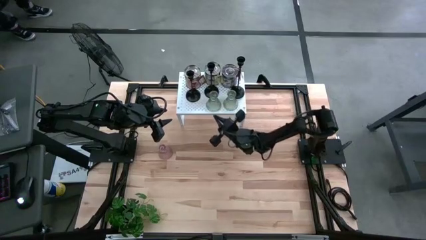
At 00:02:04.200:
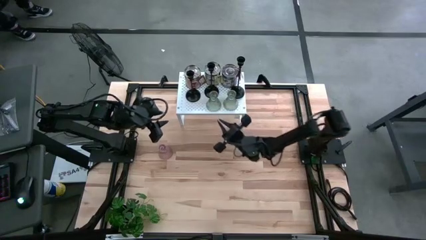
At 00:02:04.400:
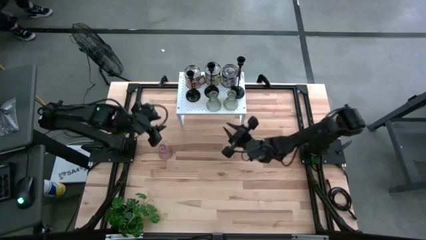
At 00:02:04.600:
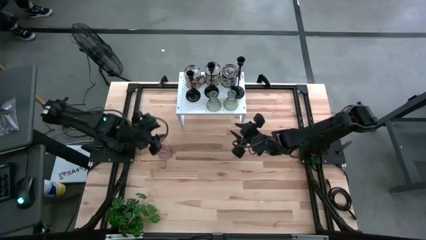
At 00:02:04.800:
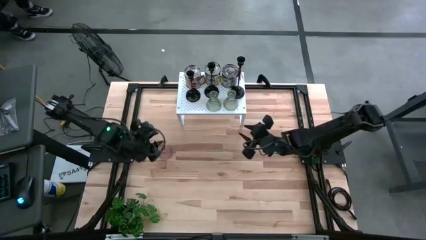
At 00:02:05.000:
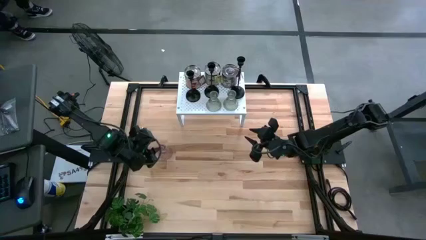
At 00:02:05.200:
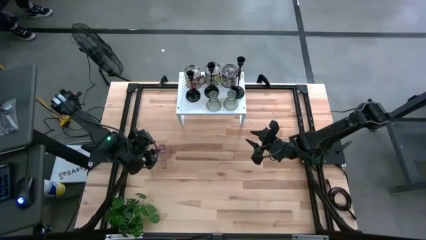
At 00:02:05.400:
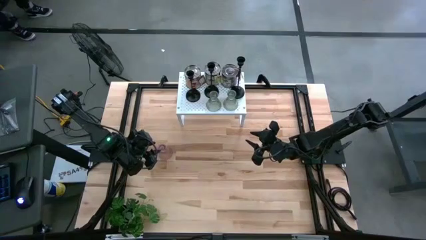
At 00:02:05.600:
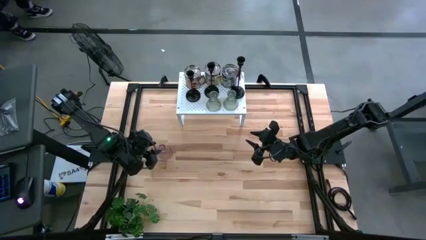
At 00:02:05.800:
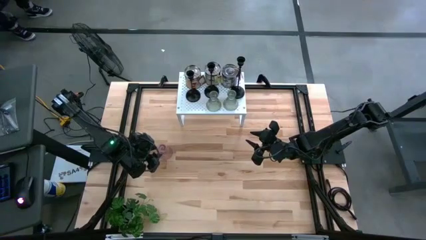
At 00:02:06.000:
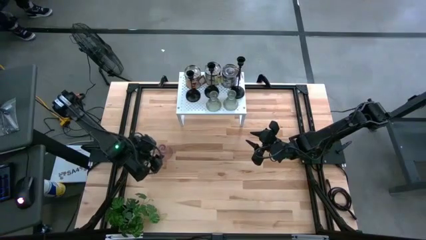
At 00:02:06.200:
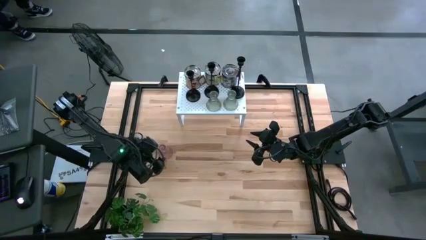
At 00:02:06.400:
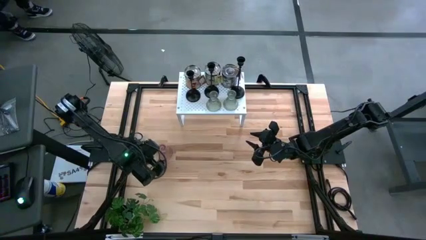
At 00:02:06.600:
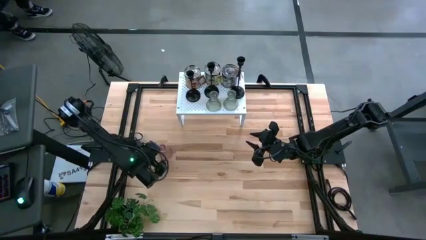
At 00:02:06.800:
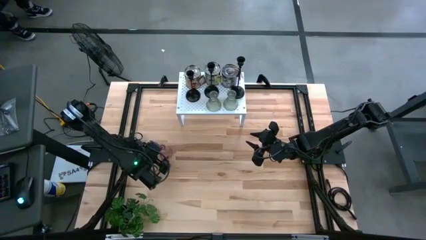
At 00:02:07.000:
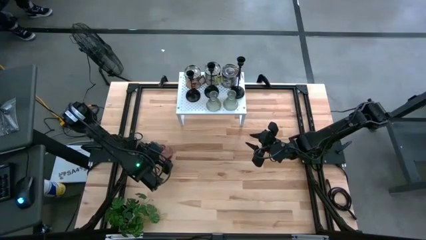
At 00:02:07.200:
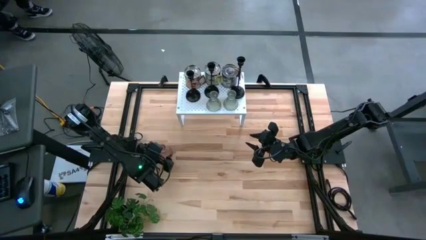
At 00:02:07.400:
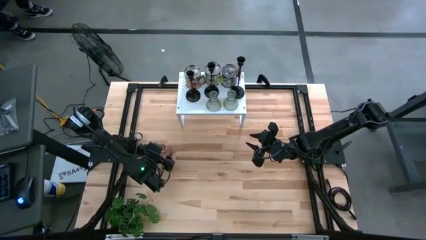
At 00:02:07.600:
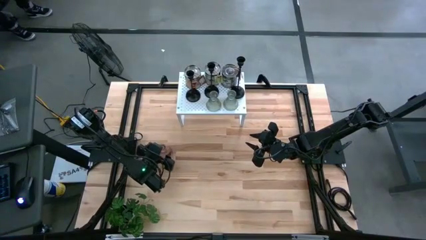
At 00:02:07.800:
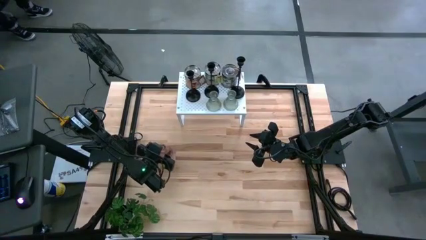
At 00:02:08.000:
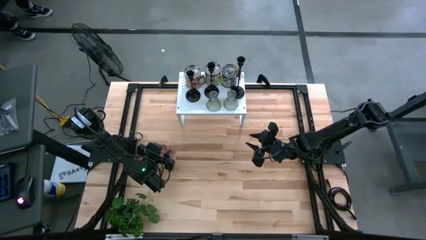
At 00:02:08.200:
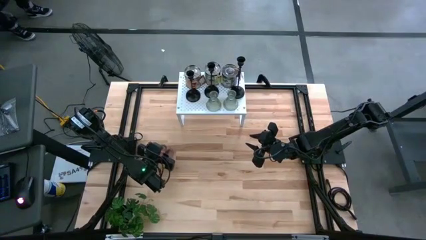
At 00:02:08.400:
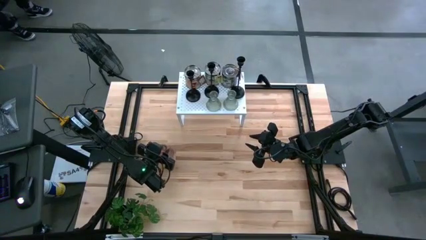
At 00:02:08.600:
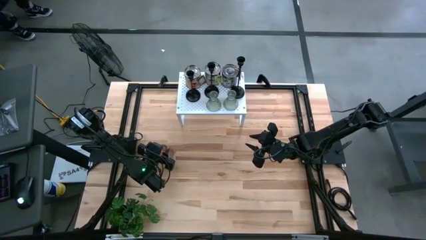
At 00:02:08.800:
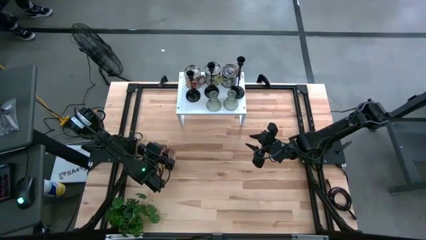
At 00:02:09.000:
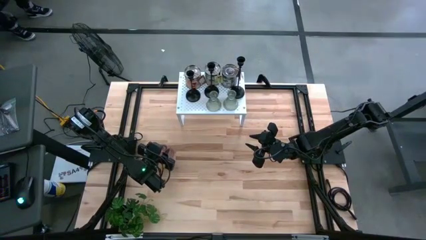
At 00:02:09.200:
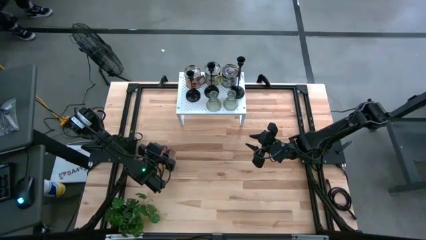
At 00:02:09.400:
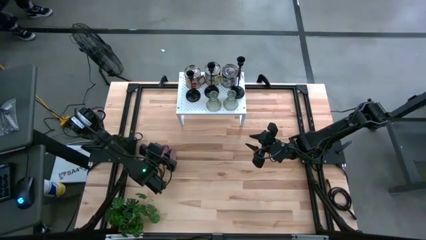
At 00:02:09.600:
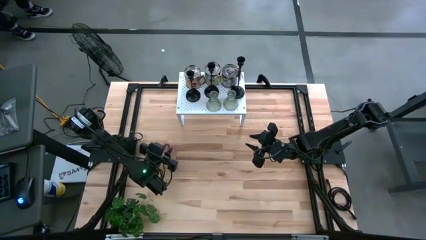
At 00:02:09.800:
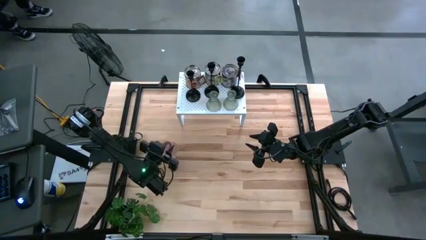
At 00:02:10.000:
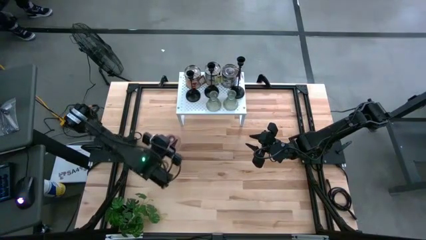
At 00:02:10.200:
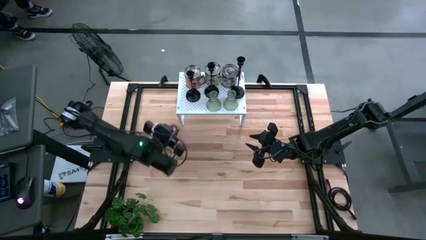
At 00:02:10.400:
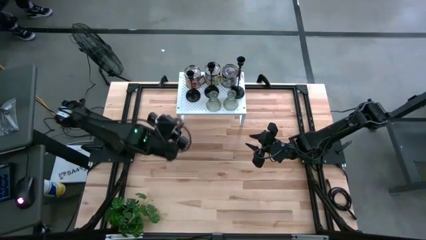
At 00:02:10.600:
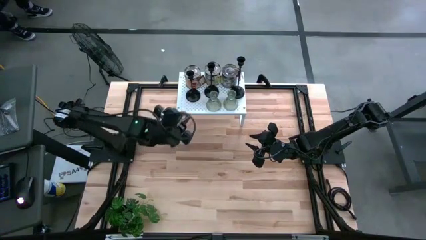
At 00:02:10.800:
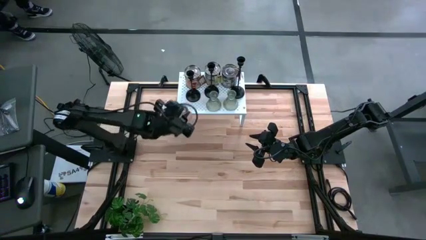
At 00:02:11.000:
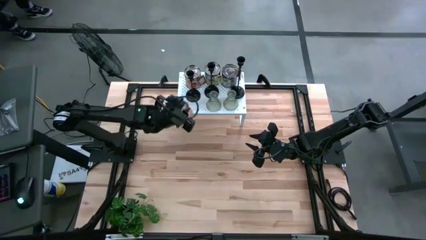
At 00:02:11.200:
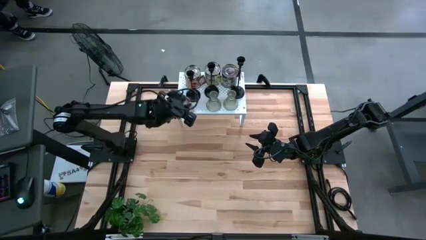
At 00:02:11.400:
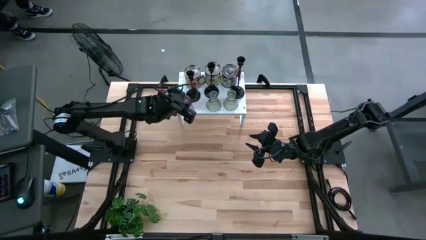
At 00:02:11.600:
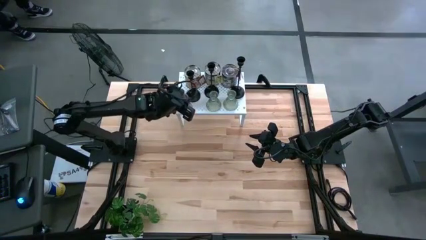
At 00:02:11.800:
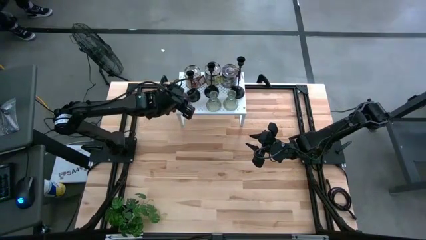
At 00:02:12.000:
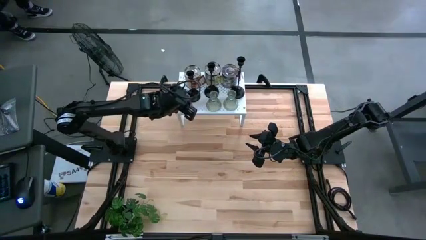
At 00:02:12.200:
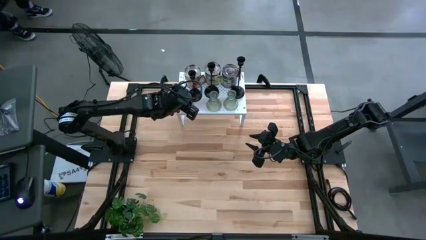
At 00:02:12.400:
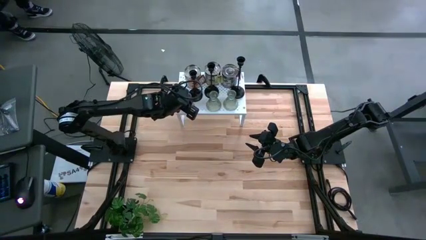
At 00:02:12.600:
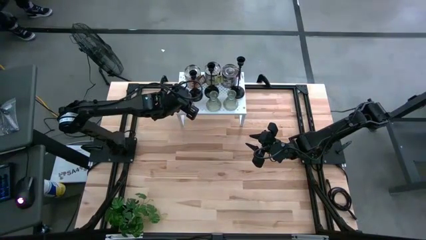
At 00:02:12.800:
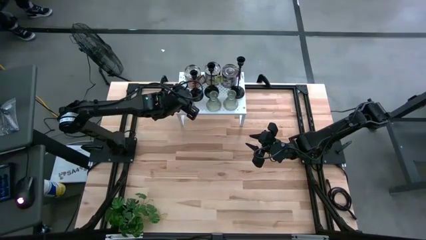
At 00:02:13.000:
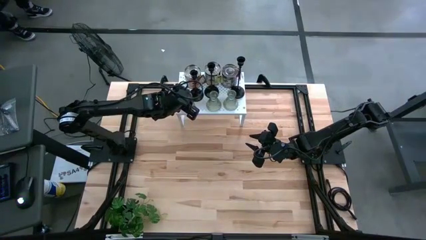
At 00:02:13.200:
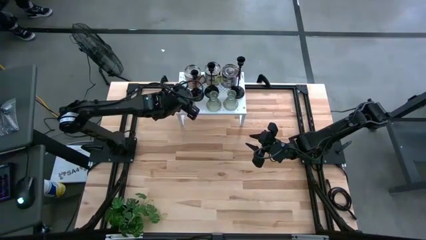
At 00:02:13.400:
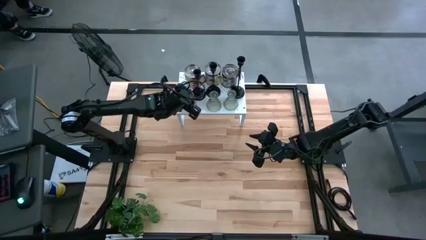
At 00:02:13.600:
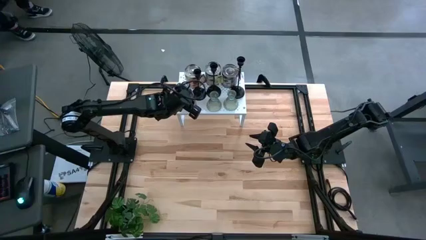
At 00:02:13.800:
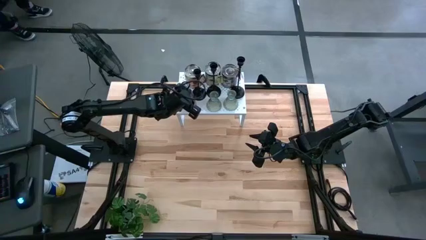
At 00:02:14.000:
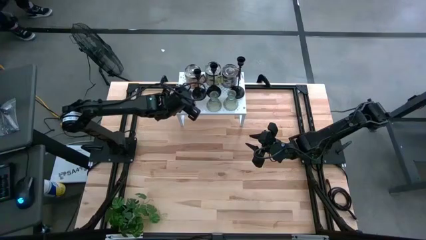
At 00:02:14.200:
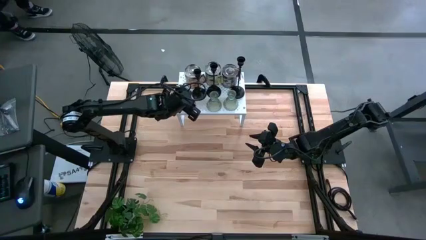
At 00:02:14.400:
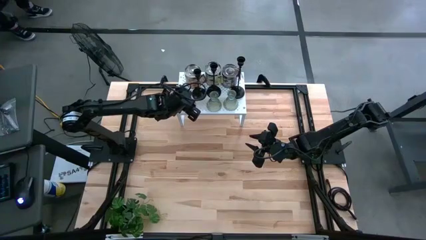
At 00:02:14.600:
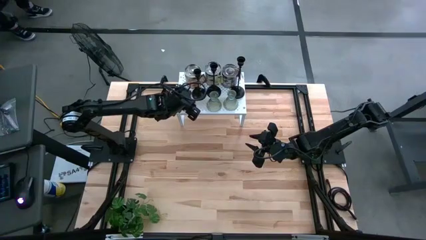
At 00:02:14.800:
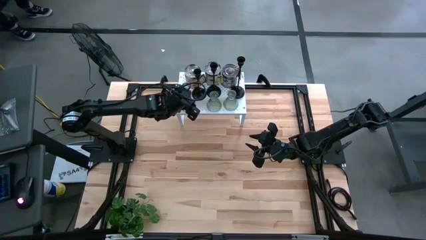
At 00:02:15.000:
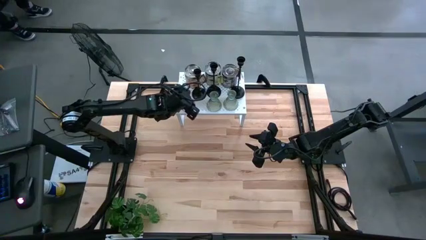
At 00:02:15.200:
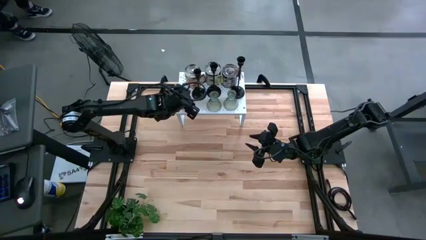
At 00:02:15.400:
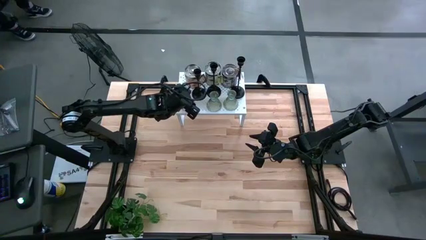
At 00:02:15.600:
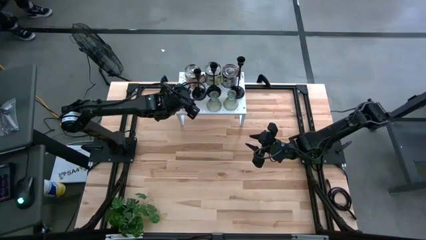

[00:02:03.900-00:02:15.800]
Task: Pick & Place candle stick holders
Put the purple candle holder on the shelf

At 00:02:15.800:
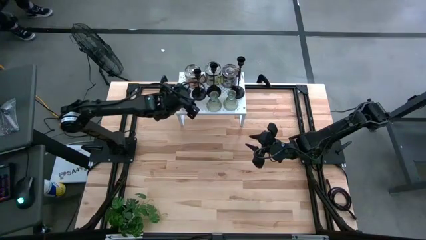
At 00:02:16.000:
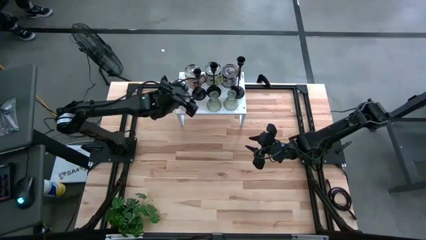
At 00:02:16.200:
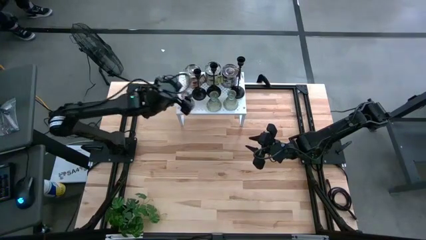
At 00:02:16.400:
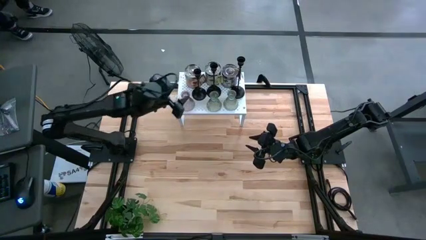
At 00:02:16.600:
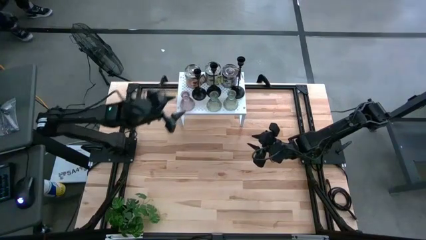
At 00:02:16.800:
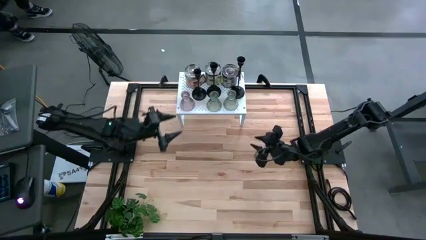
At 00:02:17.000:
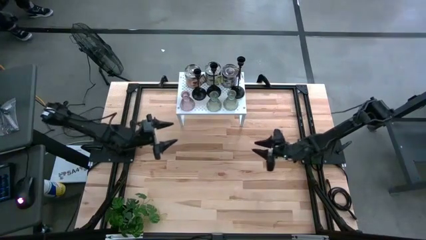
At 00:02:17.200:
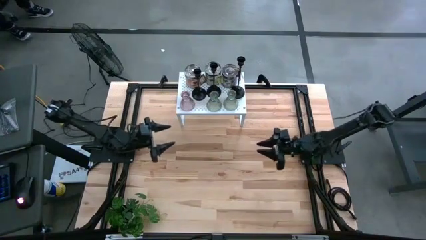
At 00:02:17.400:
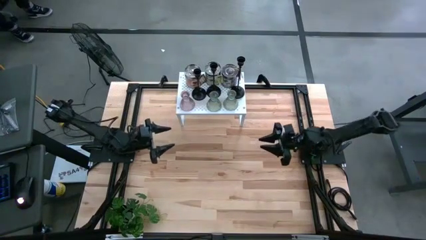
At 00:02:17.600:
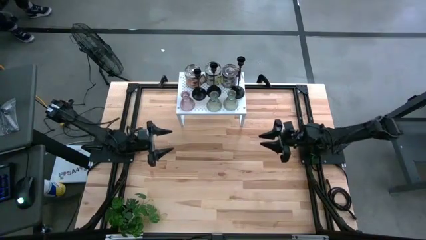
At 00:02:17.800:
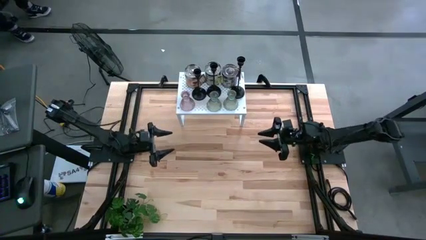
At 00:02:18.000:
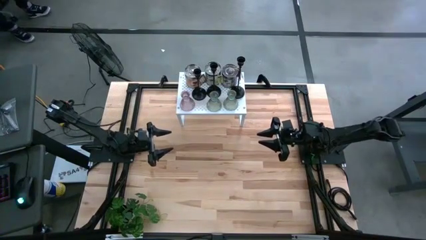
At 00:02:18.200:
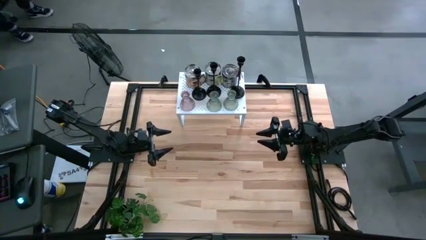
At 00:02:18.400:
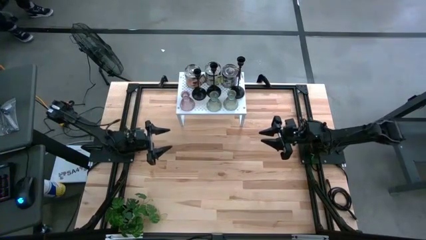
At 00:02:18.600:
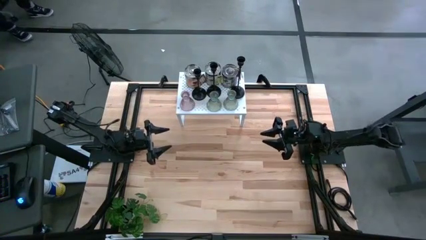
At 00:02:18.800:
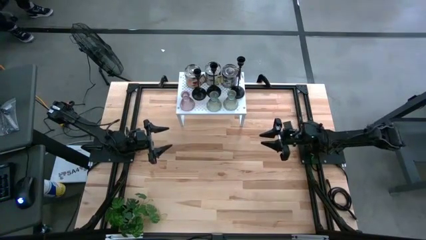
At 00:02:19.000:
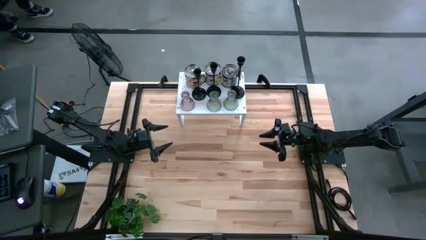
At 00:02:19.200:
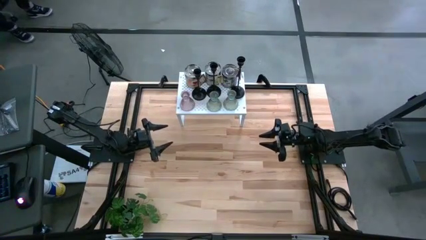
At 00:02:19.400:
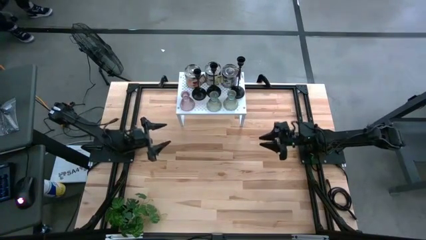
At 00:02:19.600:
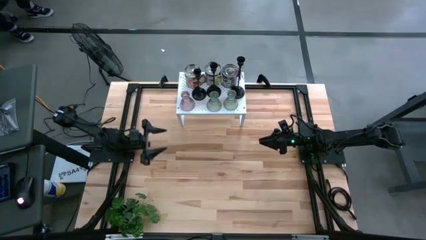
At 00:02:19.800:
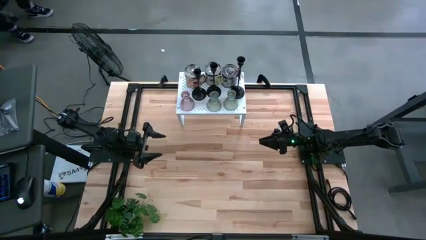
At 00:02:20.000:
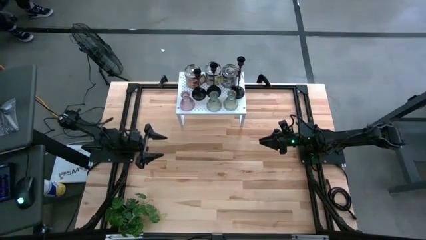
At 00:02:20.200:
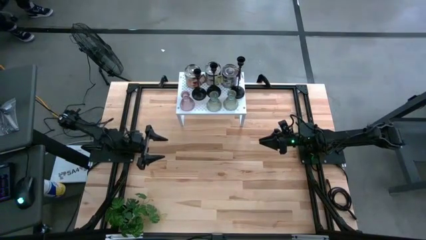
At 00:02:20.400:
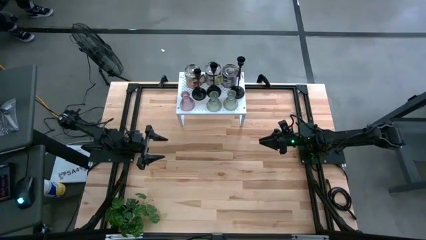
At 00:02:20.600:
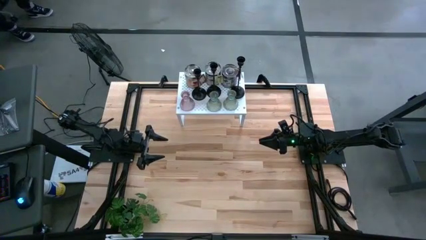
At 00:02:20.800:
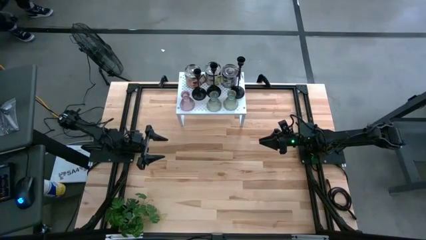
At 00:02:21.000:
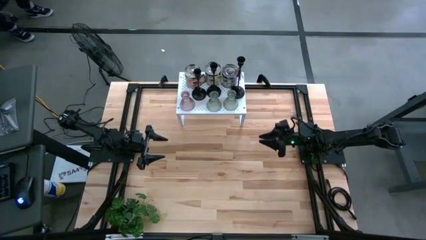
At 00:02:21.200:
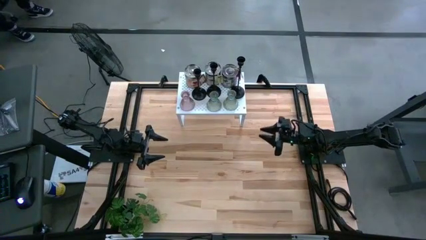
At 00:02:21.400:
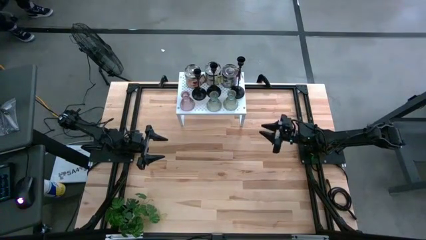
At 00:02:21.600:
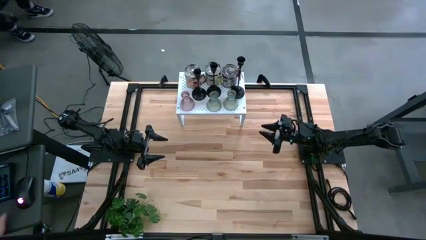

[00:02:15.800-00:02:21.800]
Return to Home Position
